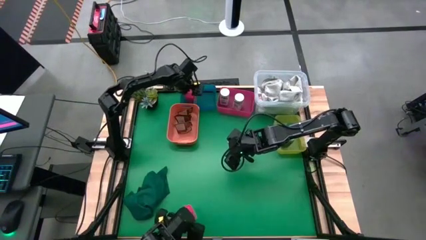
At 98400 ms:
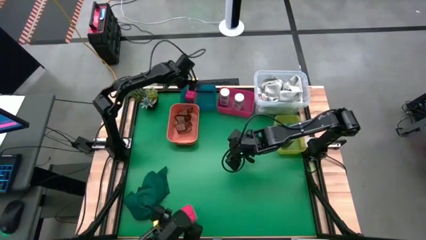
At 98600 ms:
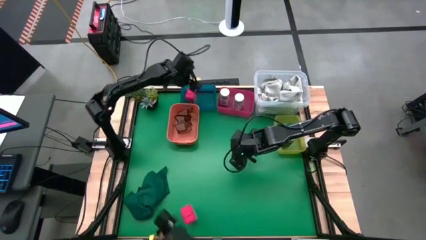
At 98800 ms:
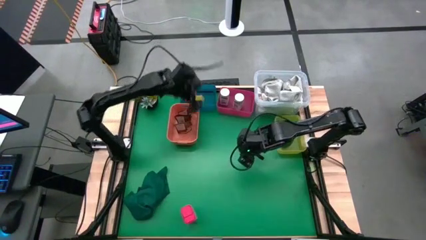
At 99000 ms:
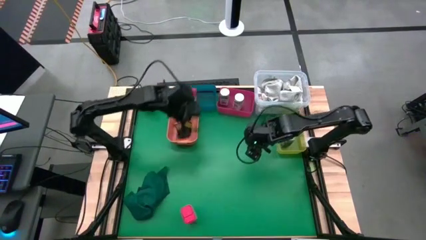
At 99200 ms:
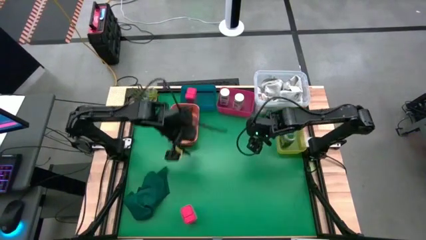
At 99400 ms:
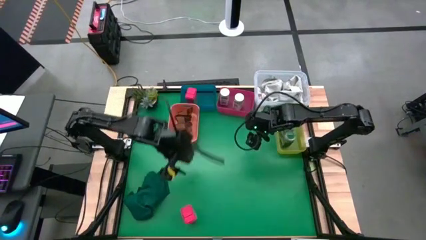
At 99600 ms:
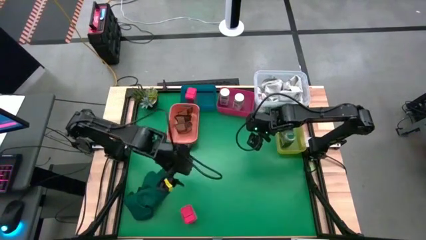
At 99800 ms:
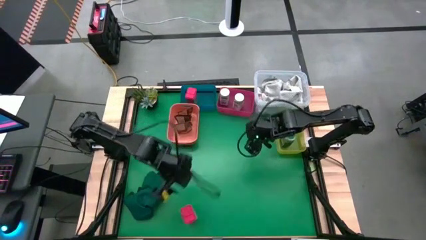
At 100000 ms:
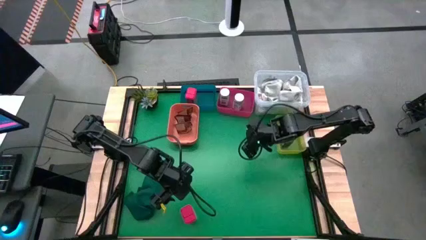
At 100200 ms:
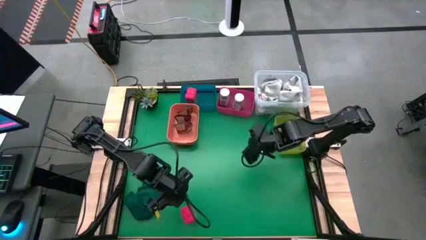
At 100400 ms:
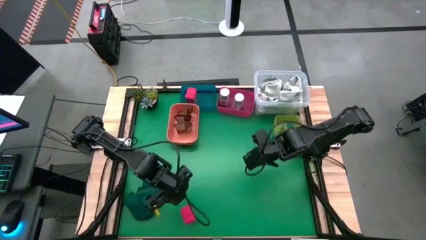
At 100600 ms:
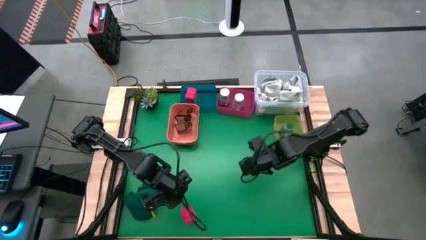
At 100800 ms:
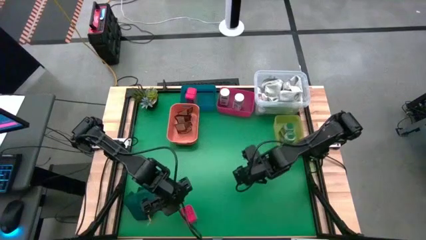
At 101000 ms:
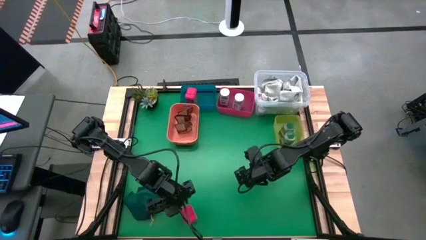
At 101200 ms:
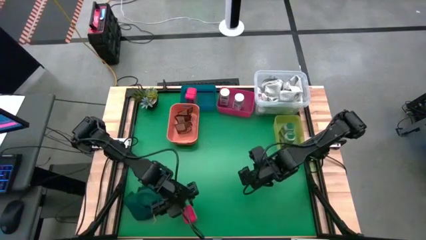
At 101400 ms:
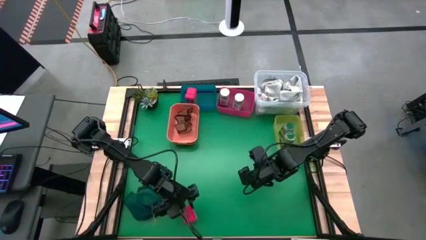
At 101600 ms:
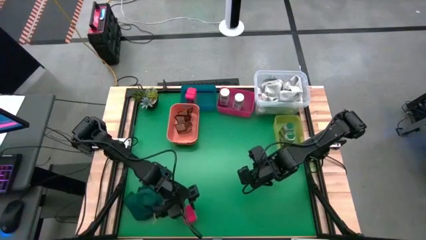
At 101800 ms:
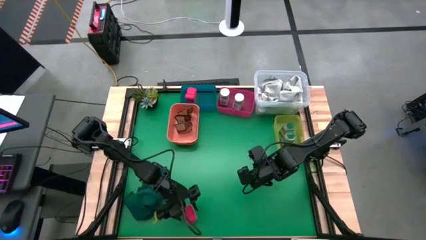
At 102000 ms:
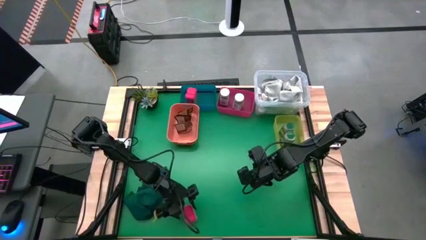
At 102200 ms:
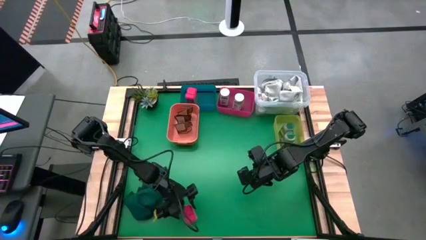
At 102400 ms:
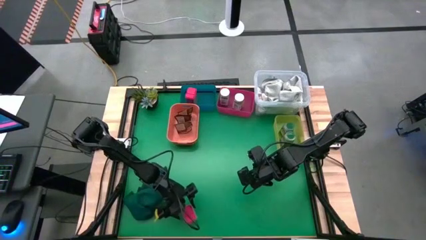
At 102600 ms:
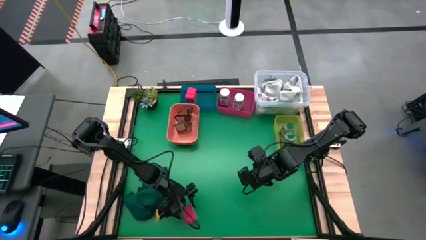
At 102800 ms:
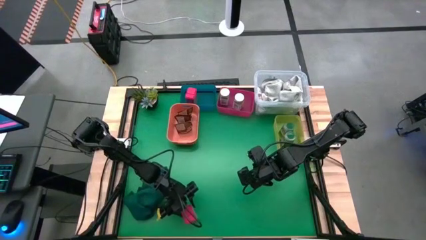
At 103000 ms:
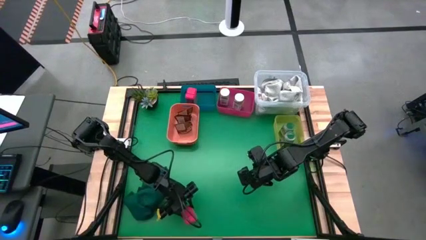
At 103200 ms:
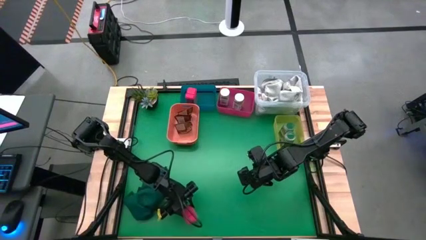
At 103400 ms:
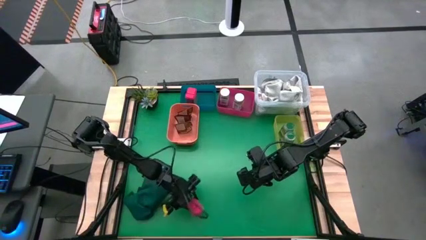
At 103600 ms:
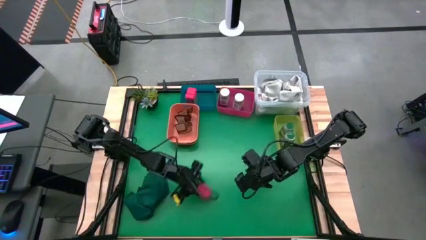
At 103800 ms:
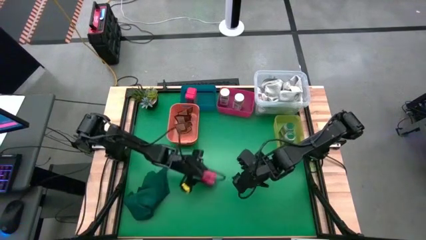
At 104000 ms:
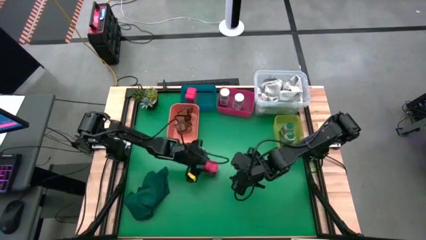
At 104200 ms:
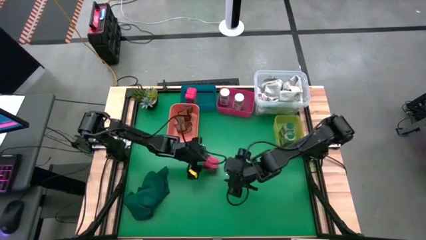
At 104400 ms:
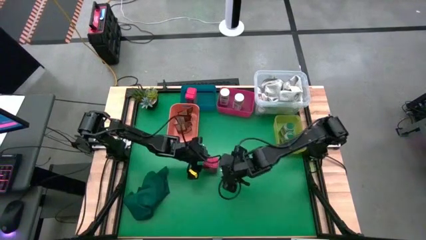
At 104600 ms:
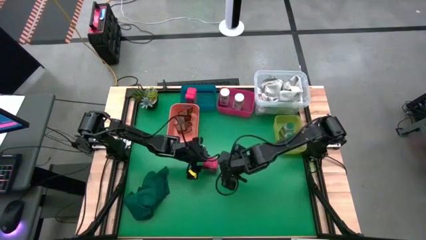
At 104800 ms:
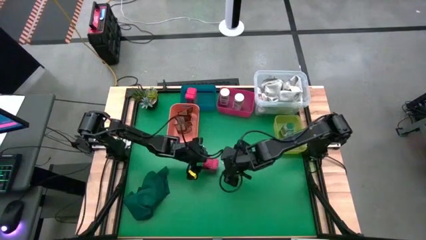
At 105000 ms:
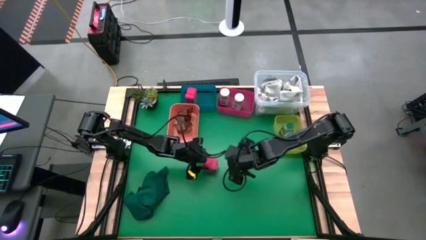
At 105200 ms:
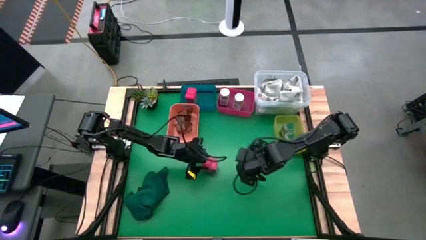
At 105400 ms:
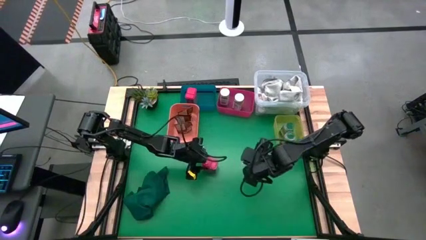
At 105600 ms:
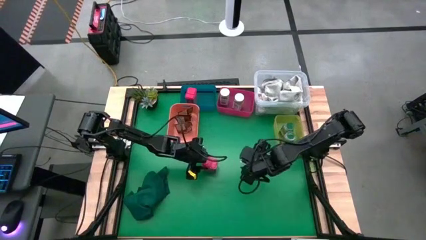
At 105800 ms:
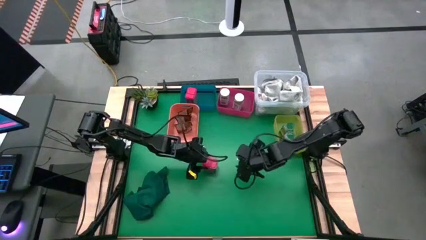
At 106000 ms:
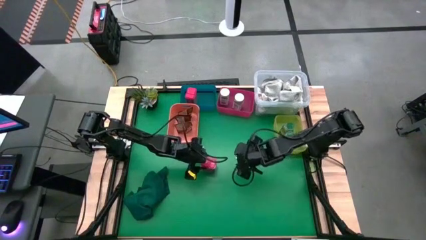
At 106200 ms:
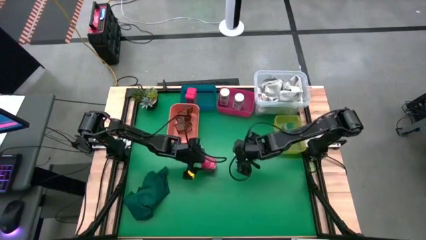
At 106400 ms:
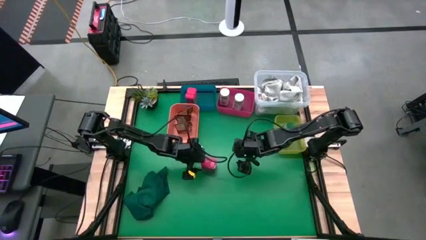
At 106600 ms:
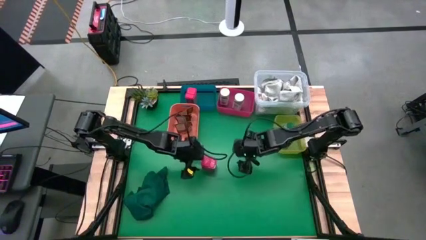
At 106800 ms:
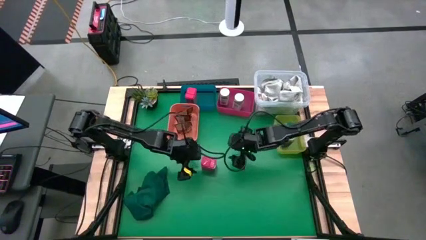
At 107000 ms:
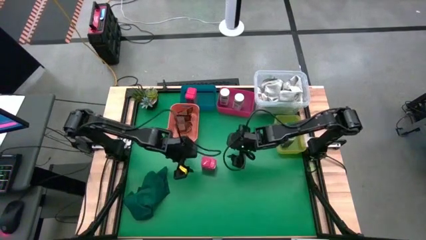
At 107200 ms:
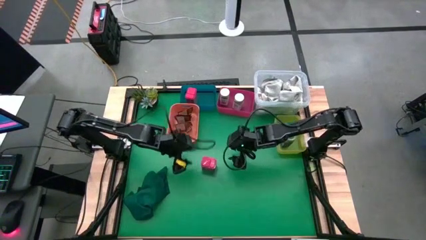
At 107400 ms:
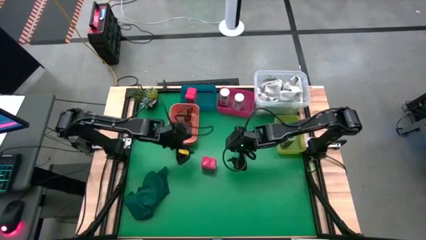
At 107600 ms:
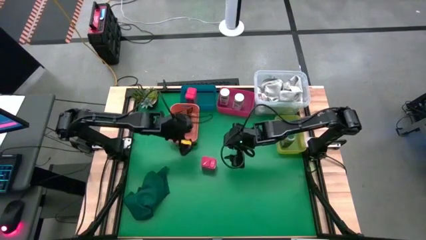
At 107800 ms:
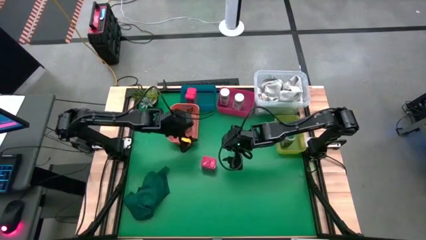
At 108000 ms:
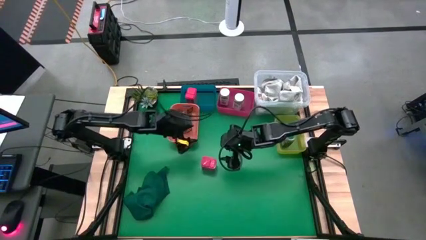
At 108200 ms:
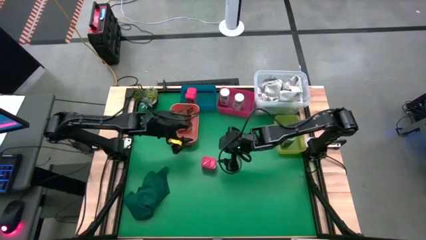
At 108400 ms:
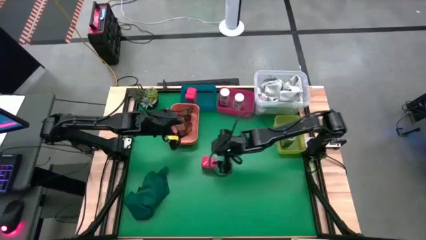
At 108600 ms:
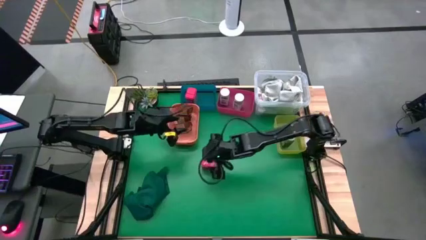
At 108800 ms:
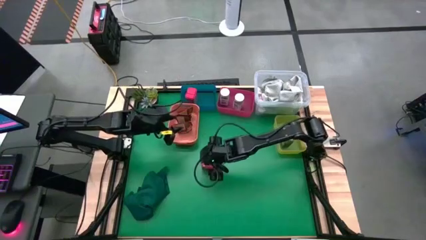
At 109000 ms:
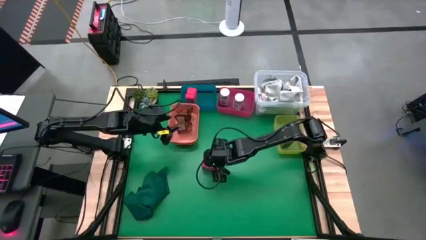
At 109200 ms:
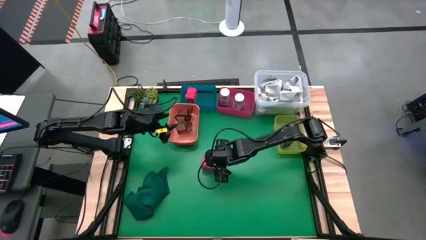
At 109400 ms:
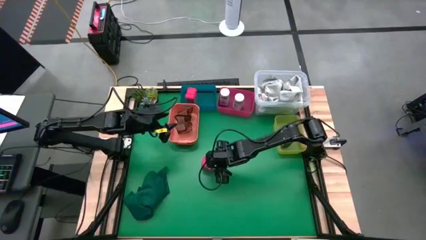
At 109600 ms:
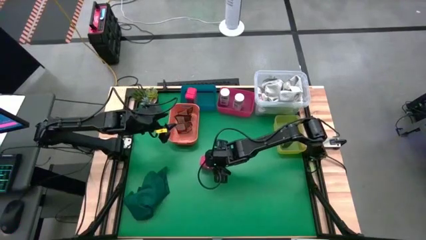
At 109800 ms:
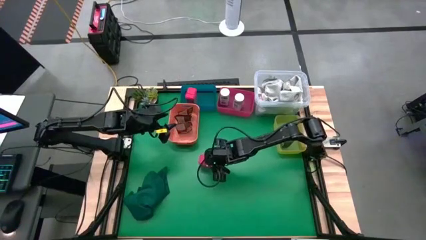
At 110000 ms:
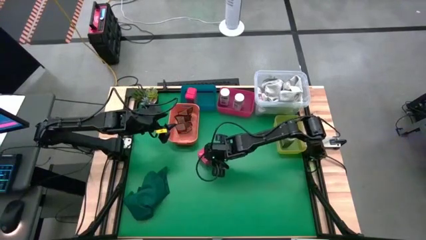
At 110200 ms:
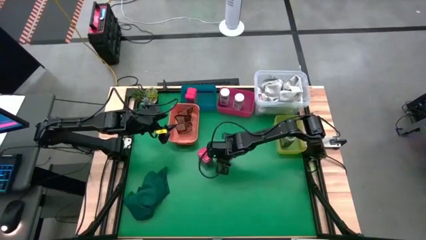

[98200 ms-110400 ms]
Task: Sort spices by type
Put the red spice can into the blue bin

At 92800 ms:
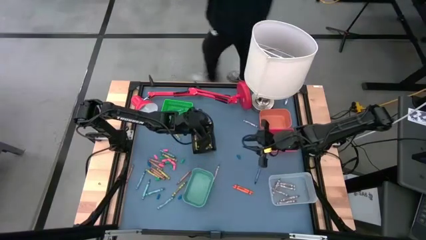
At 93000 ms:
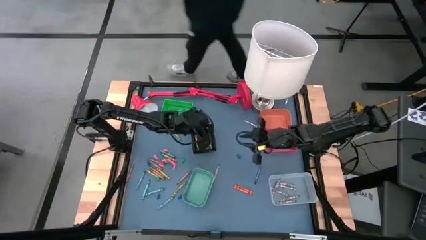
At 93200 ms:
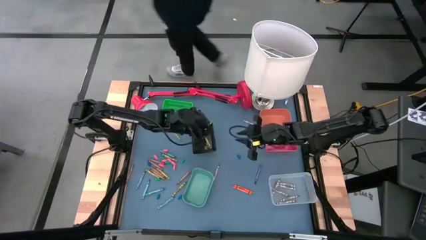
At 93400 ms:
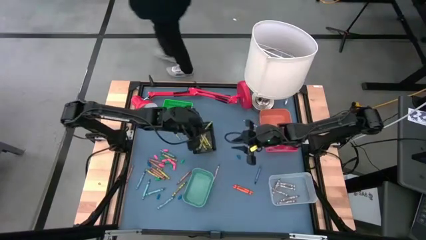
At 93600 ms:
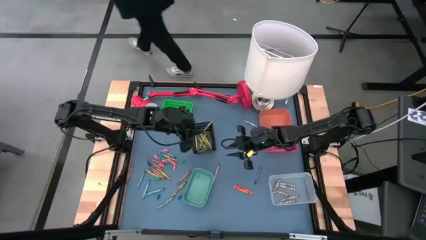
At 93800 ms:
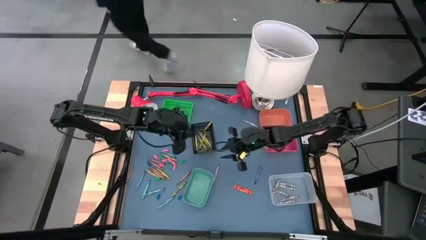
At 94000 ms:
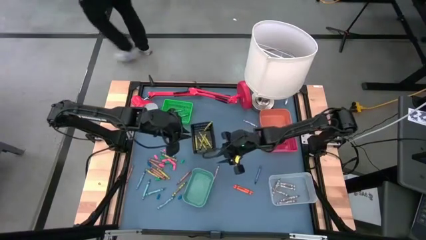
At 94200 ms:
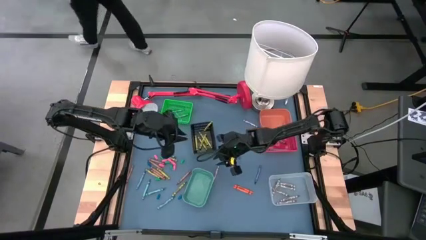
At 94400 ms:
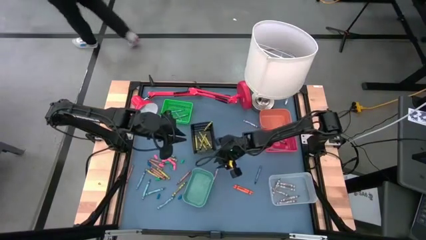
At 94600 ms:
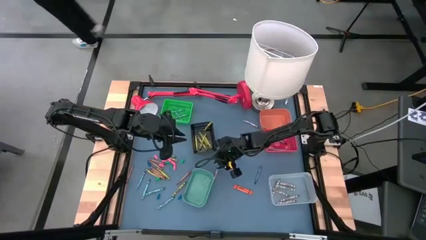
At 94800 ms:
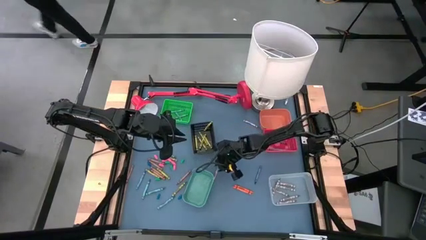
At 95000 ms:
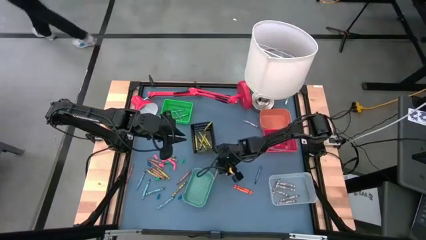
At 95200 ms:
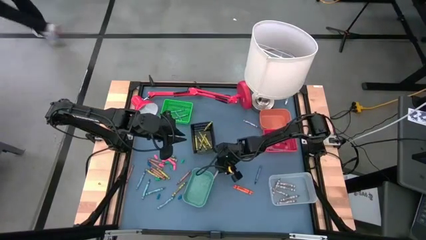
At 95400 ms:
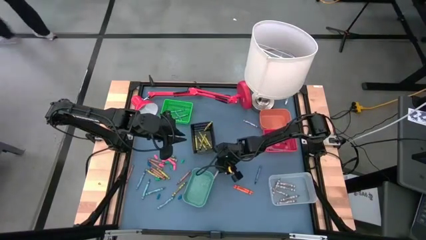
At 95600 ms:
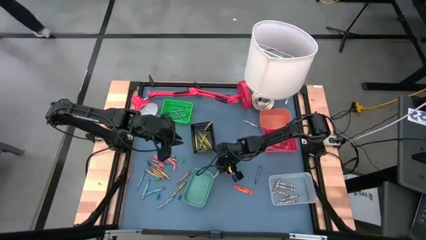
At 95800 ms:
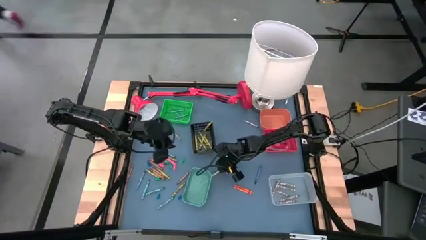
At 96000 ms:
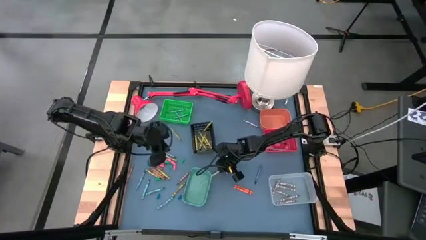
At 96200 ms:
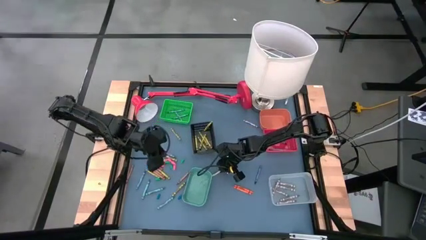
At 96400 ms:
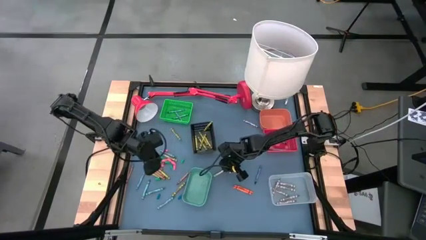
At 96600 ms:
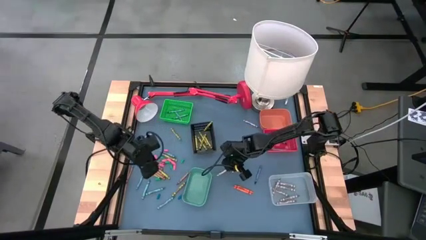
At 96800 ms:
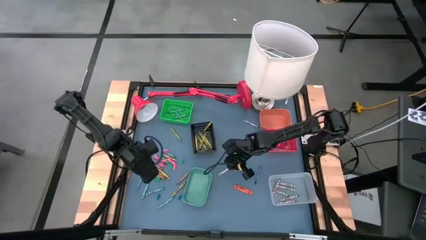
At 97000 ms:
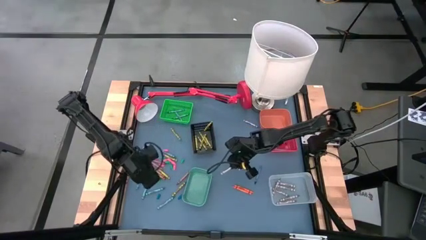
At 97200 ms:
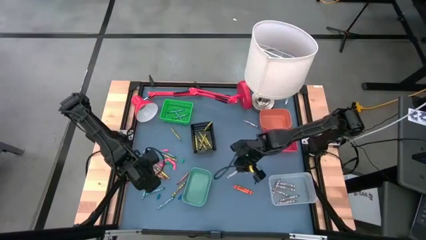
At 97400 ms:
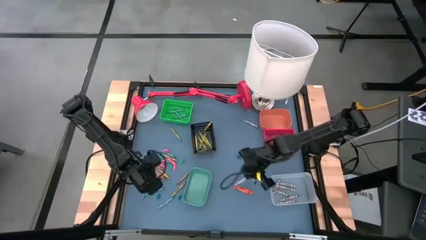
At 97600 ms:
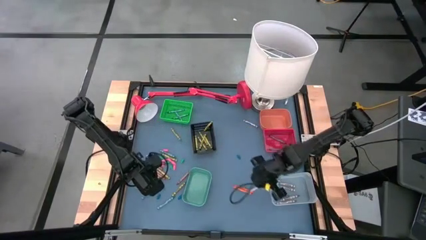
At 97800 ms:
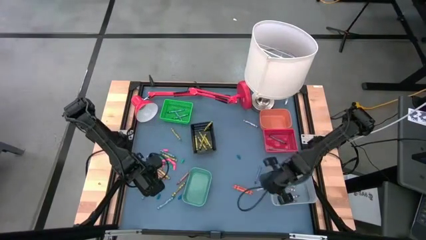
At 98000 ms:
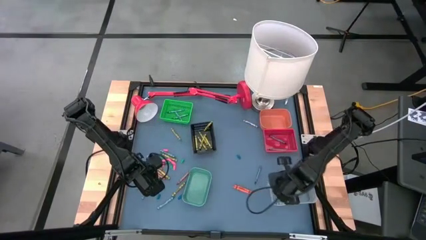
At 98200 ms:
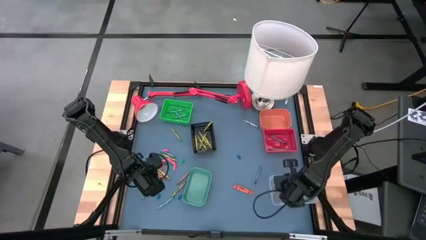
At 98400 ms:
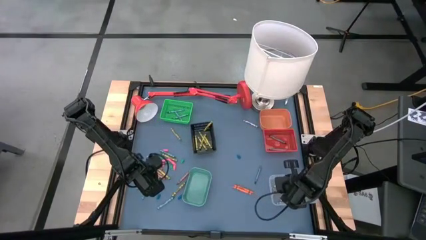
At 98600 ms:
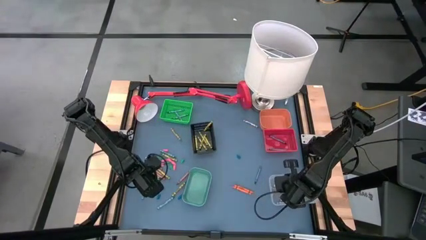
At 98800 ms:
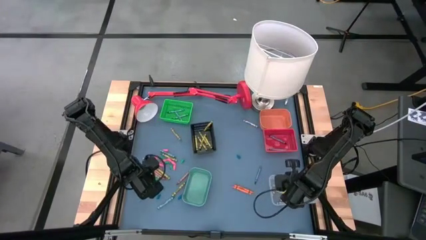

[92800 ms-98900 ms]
Task: Sort crayons
Put the gray crayon into the white bin
